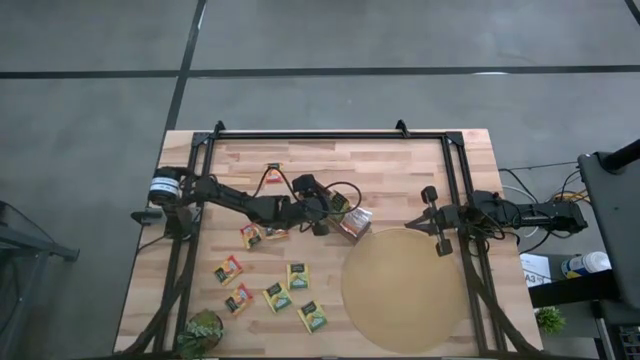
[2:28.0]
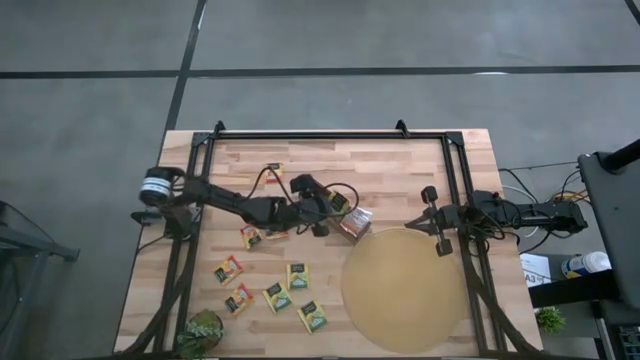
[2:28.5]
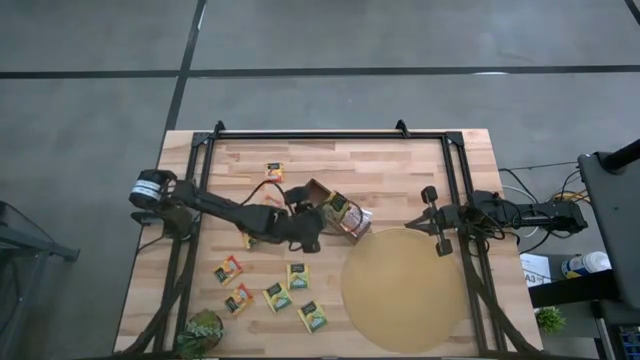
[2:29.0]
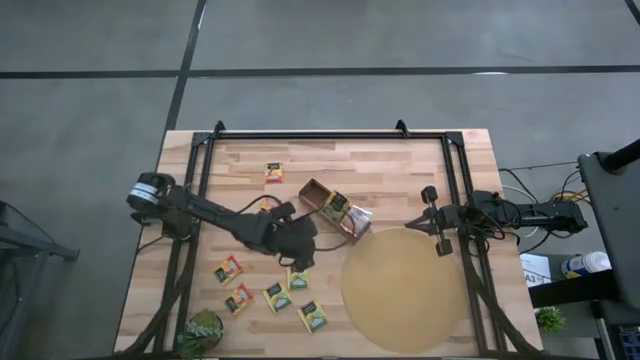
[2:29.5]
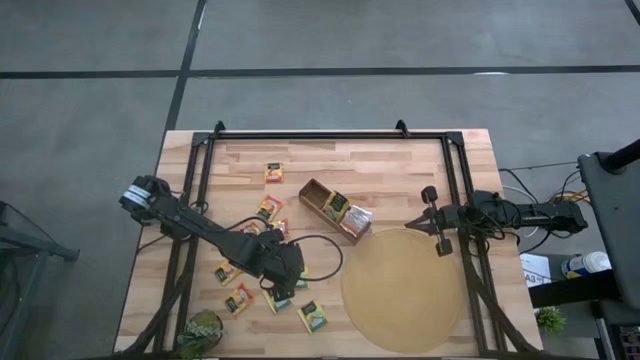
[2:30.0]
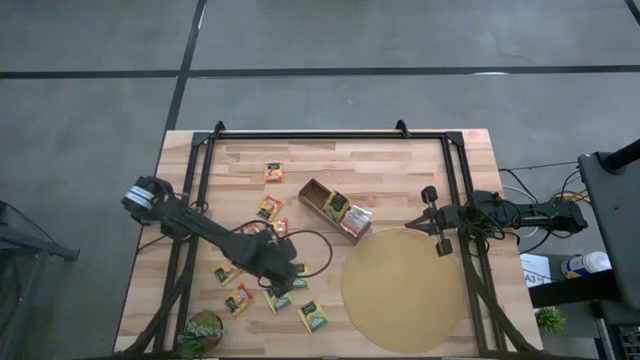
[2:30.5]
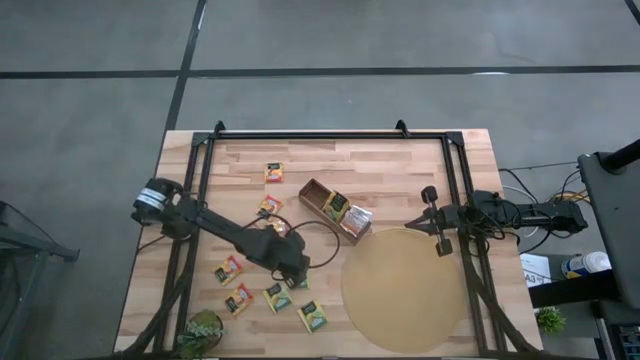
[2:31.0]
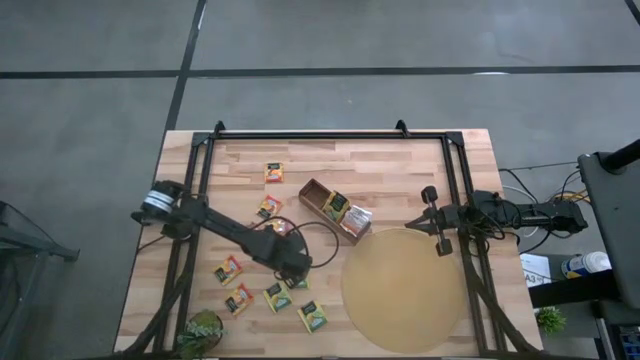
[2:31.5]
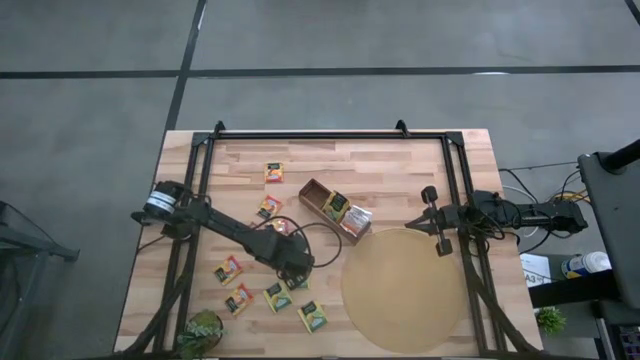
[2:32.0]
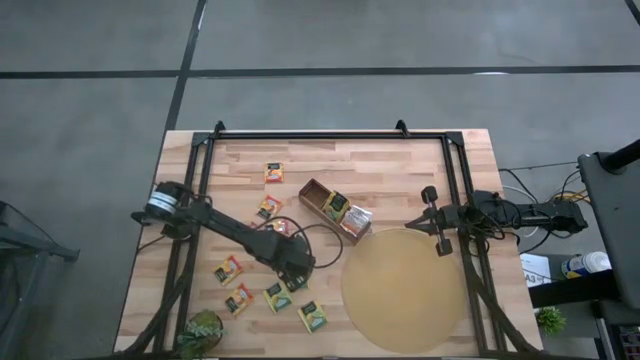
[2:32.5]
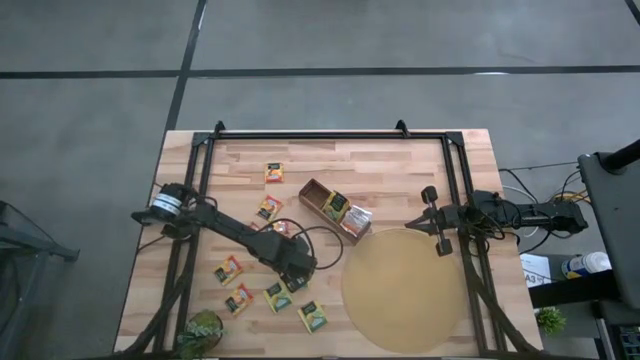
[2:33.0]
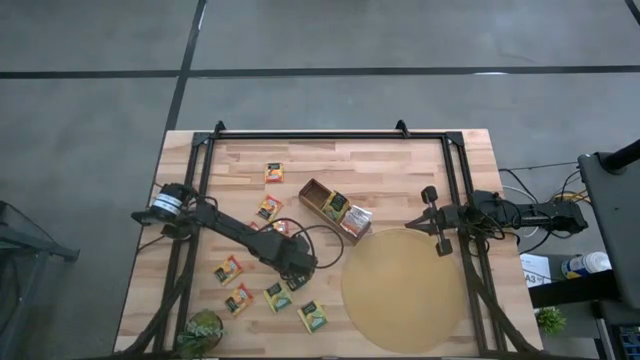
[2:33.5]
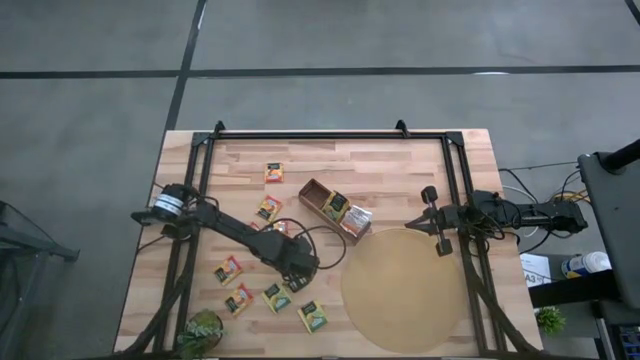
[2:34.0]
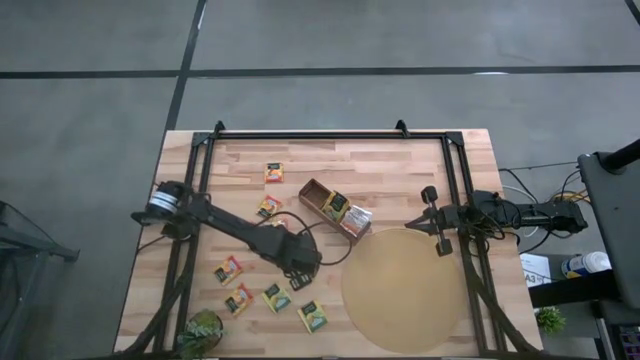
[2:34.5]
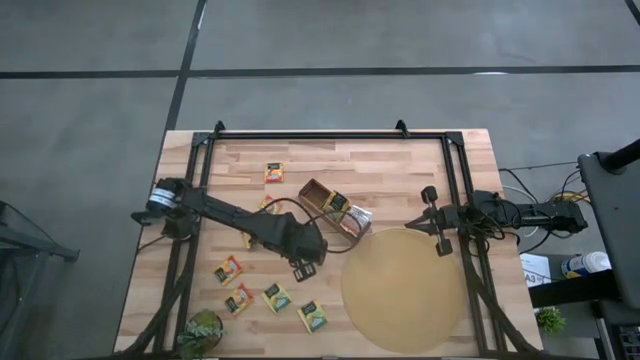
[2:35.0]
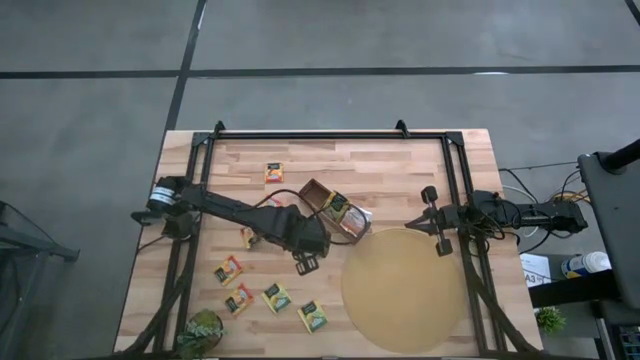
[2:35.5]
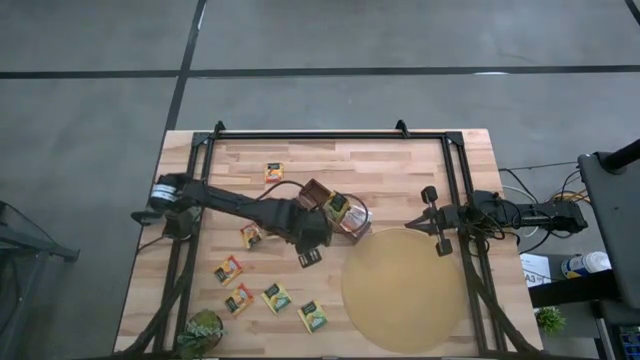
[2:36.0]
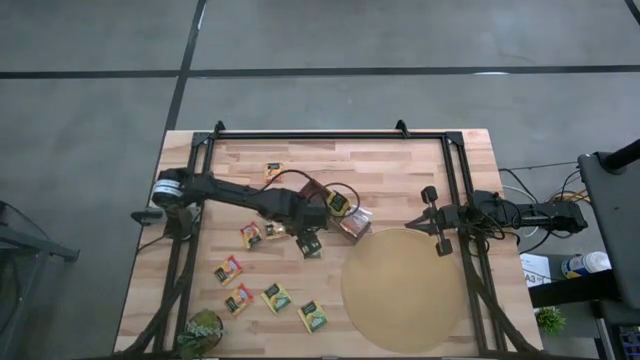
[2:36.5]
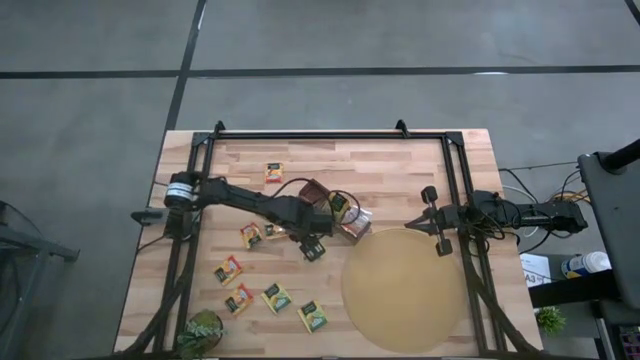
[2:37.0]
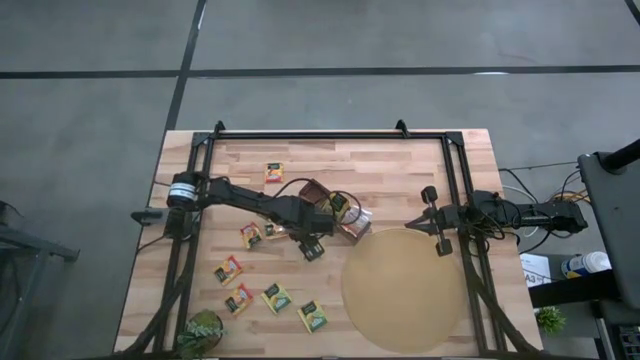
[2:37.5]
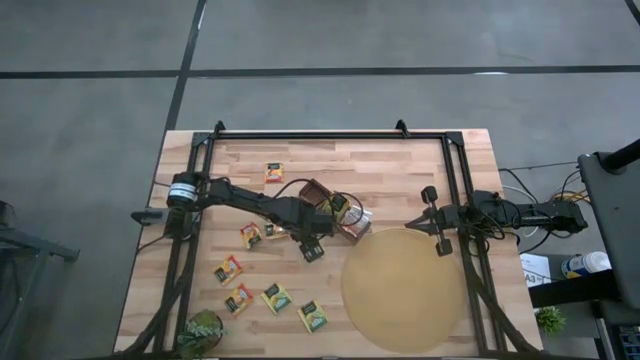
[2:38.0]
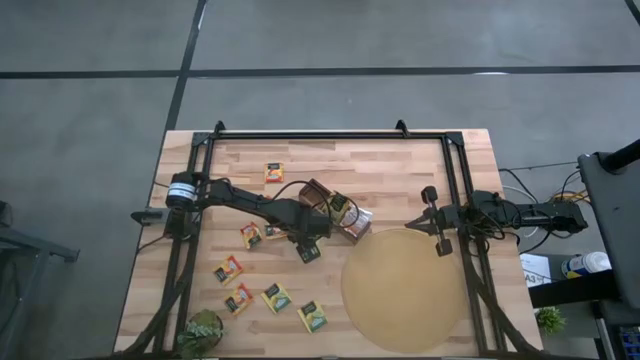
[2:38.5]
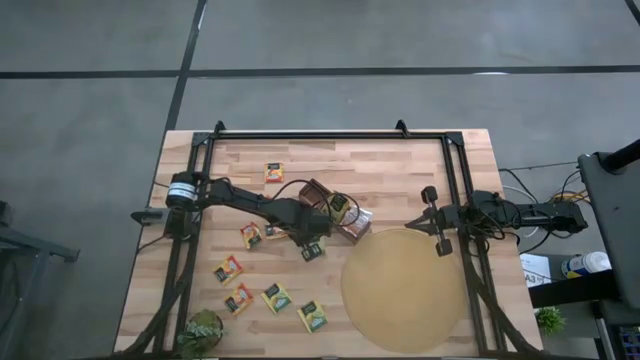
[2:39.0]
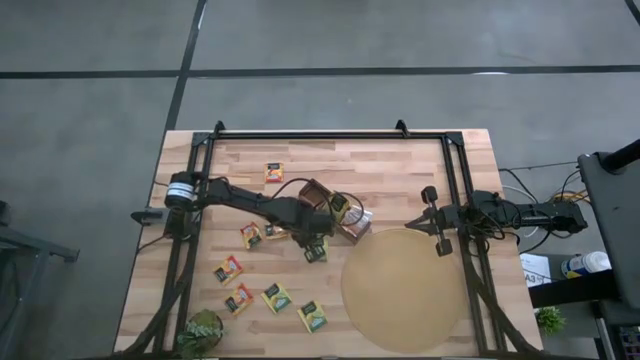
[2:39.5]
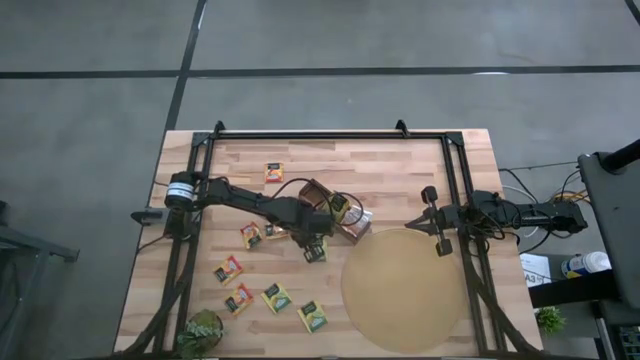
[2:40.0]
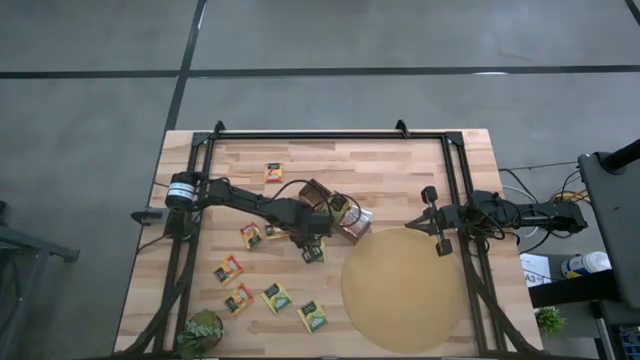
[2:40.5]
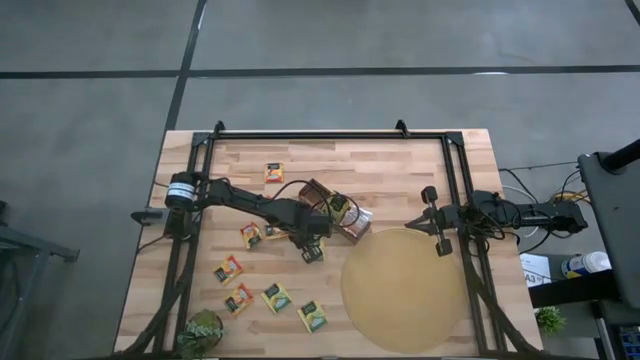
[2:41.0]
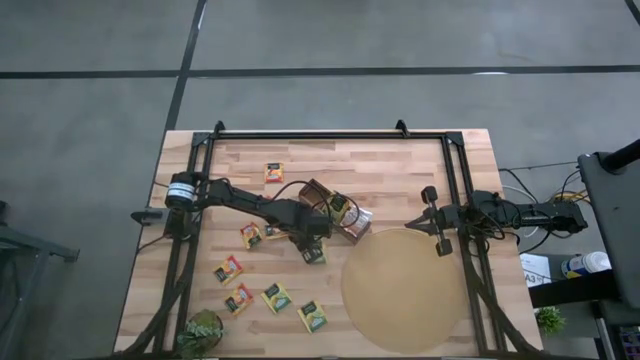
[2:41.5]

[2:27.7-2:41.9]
Task: Pick & Place Tea
Put the yellow tea bag into the middle section of the wooden organizer

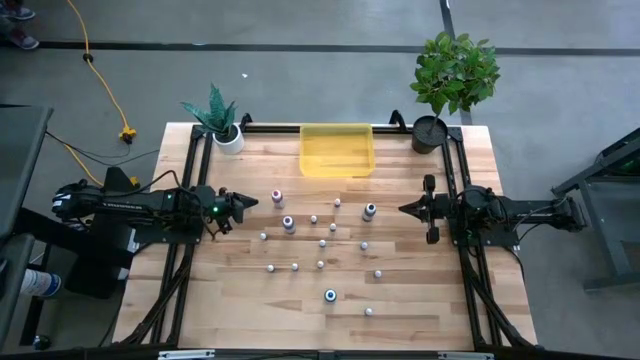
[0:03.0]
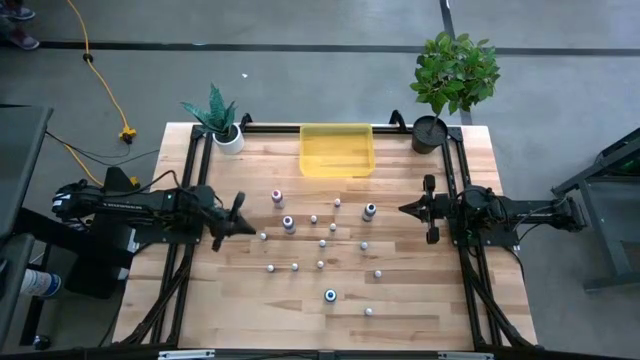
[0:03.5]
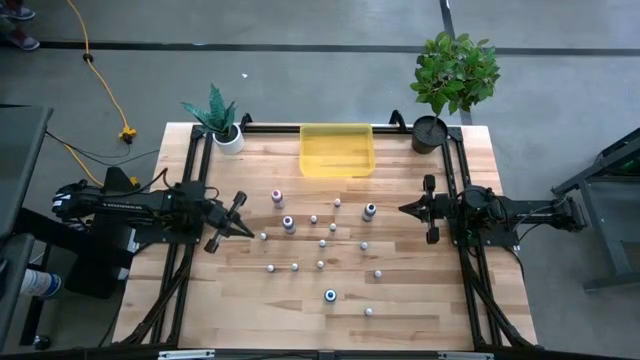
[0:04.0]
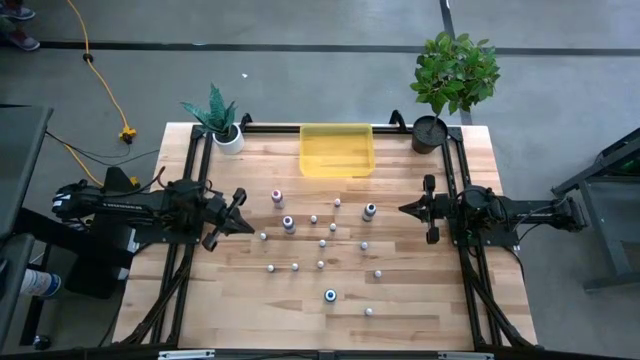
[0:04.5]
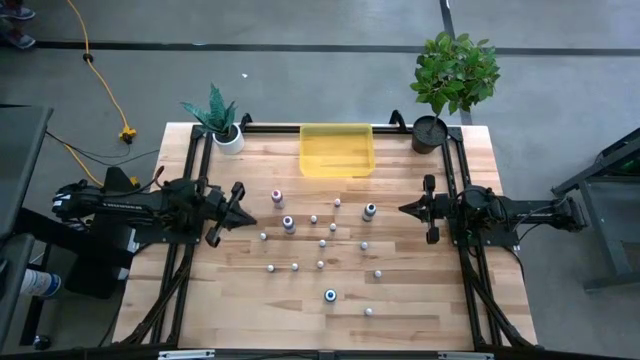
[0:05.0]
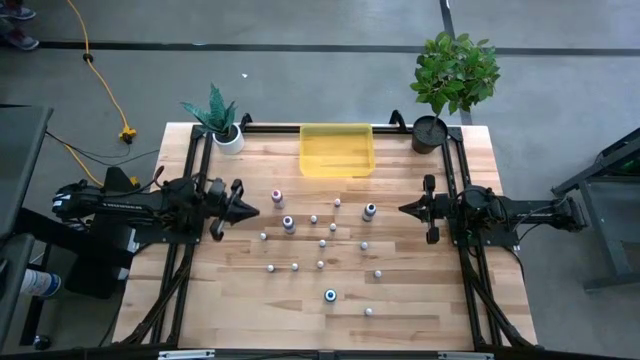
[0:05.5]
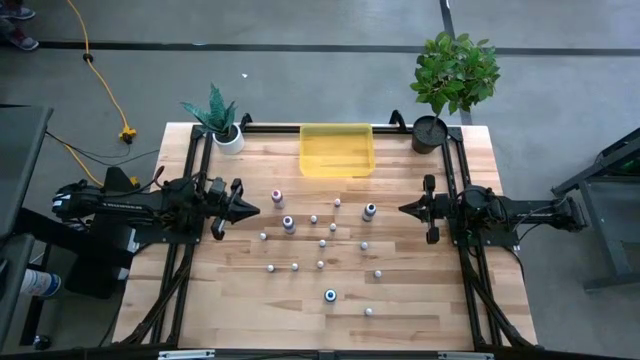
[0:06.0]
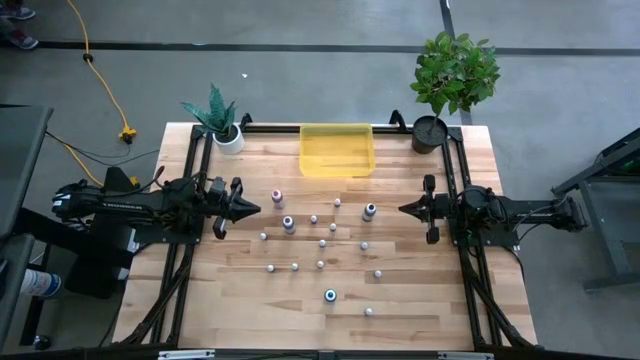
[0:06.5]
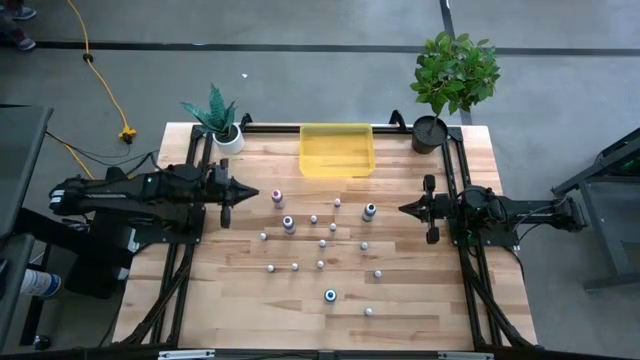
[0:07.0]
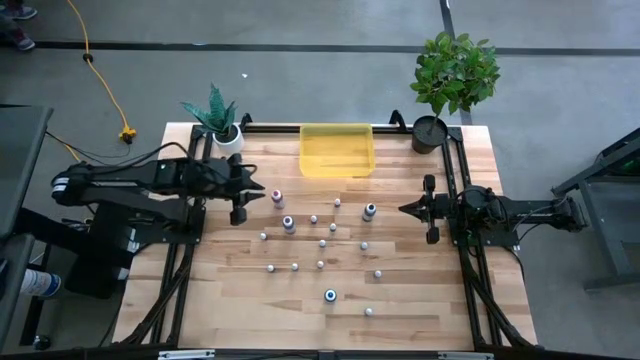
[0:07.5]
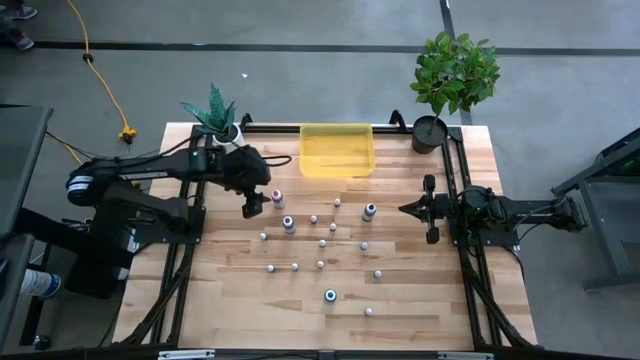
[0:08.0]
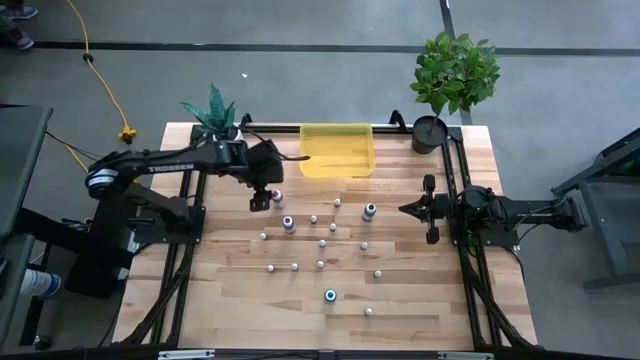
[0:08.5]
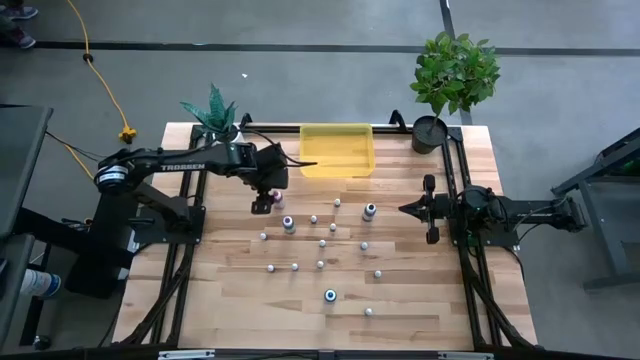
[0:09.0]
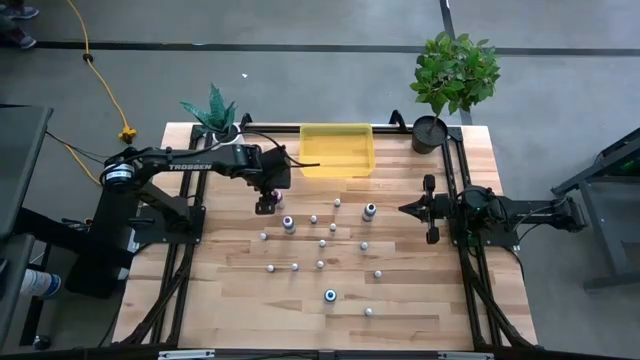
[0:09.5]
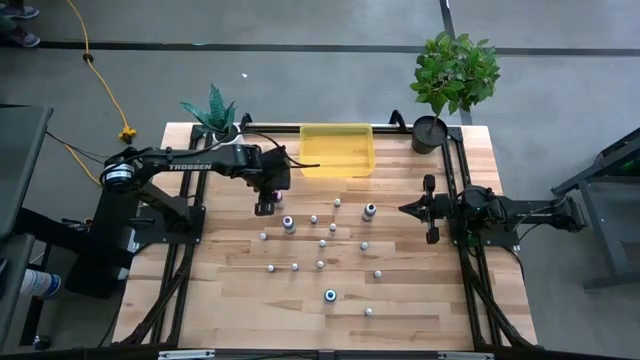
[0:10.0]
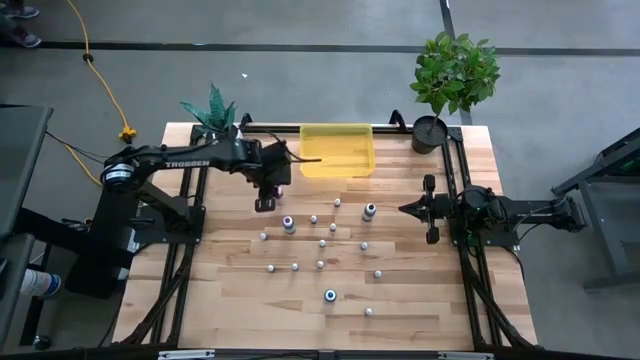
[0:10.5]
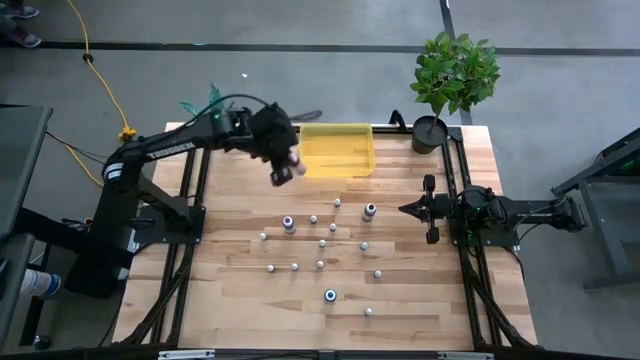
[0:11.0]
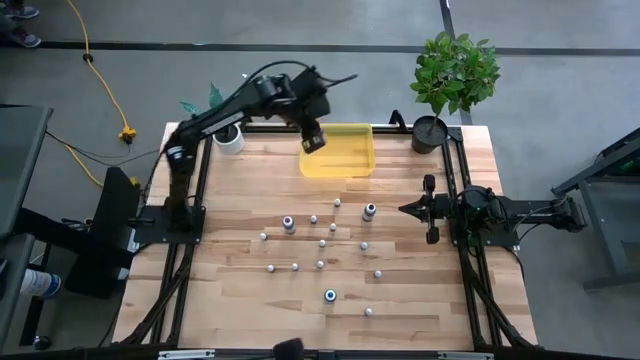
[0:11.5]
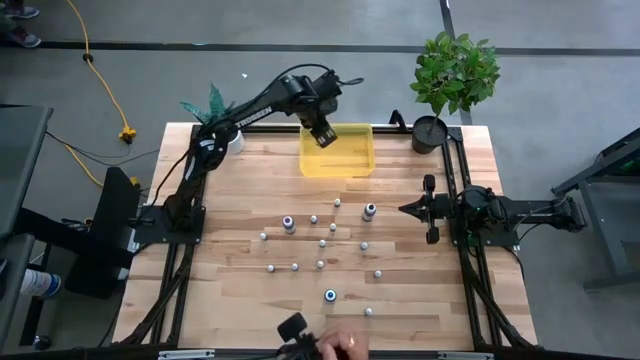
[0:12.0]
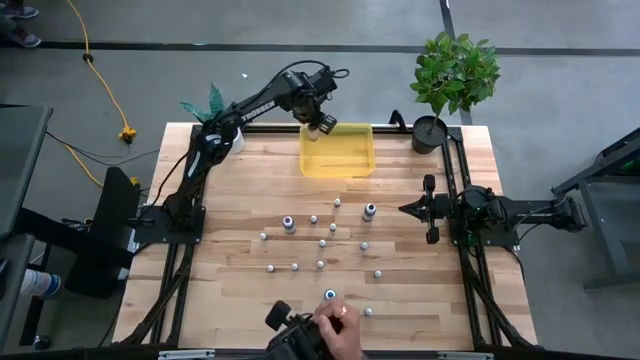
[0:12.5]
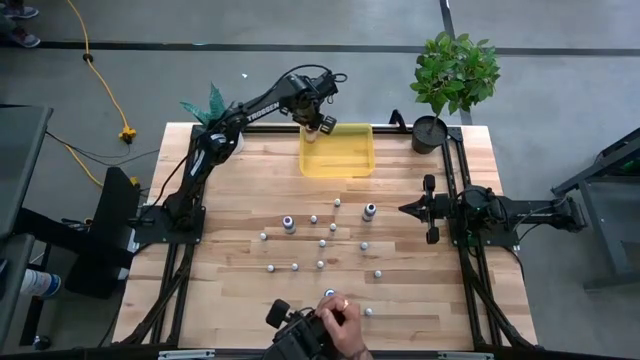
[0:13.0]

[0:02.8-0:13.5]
Task: Pick & Place food coloring
Put the large red food coloring bottle into the yellow bin
